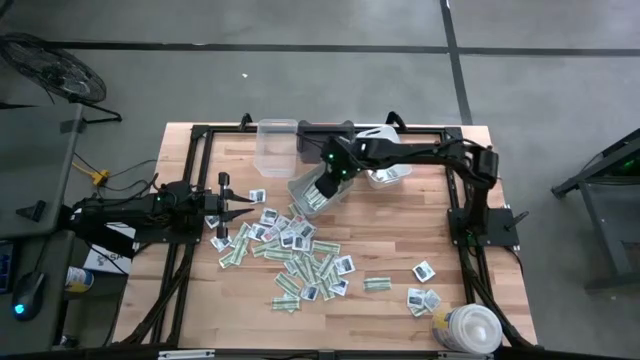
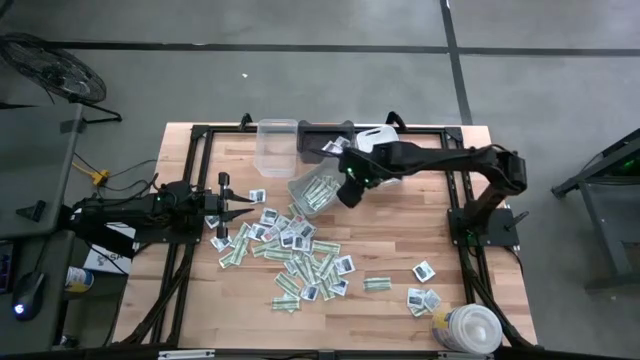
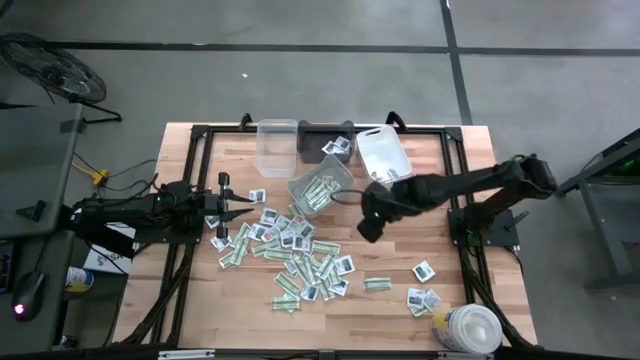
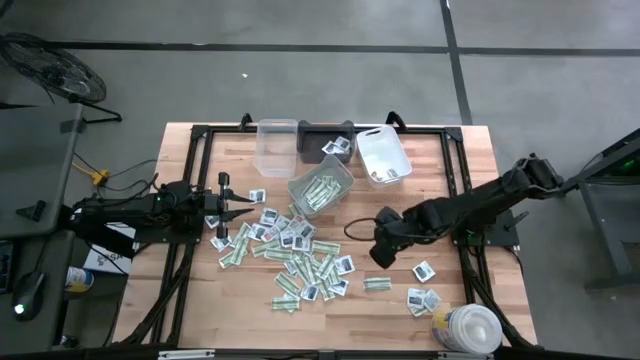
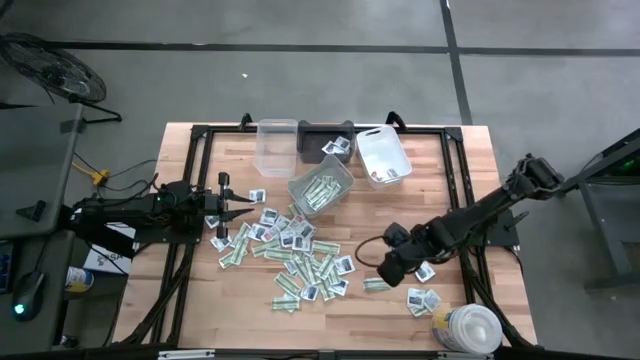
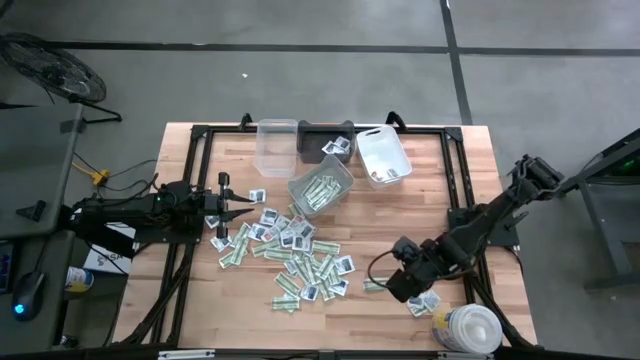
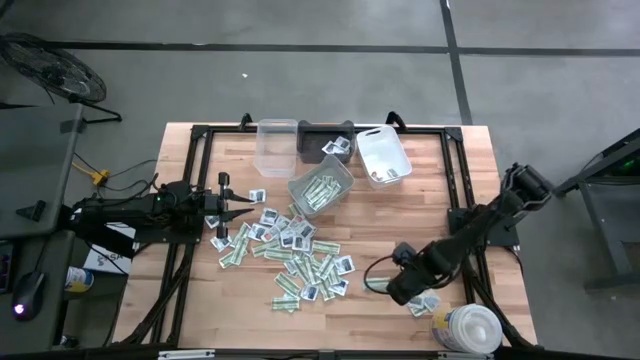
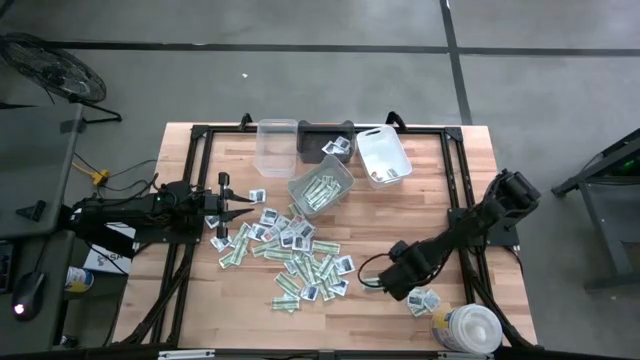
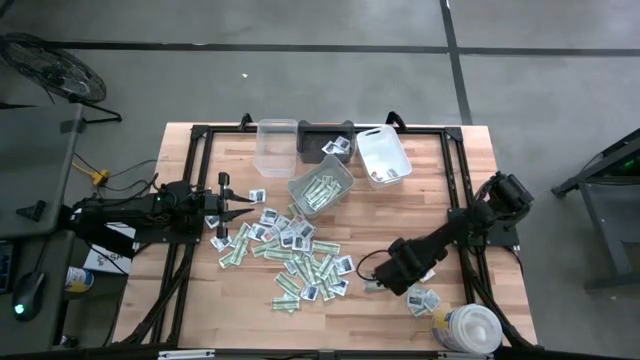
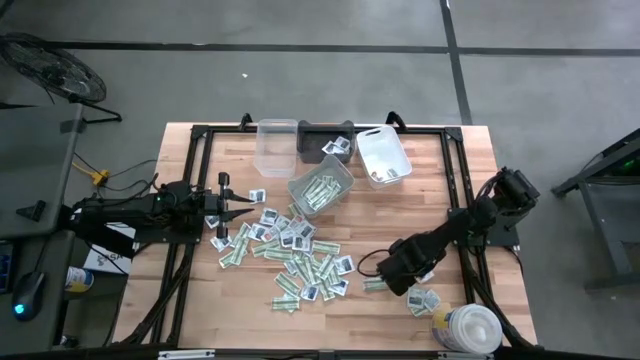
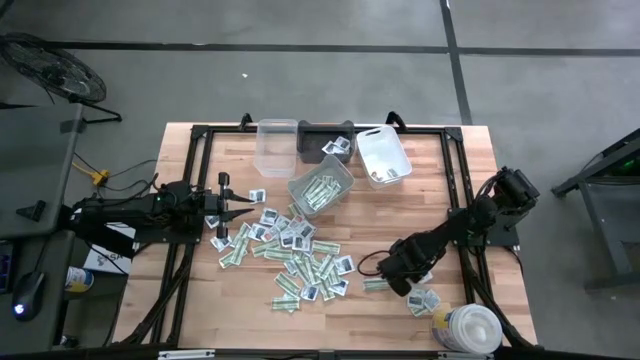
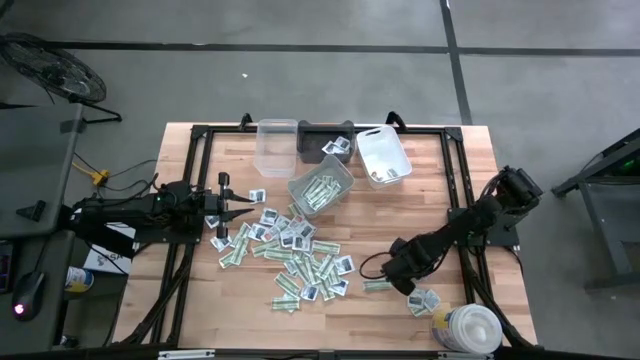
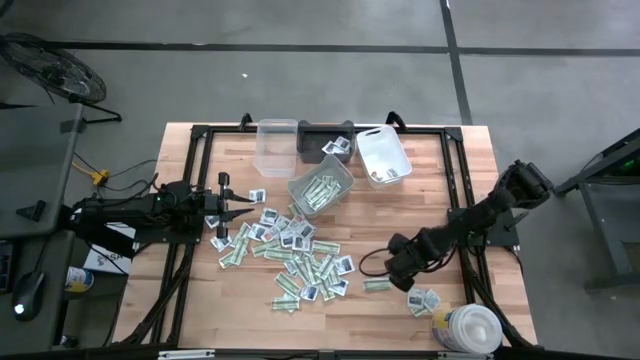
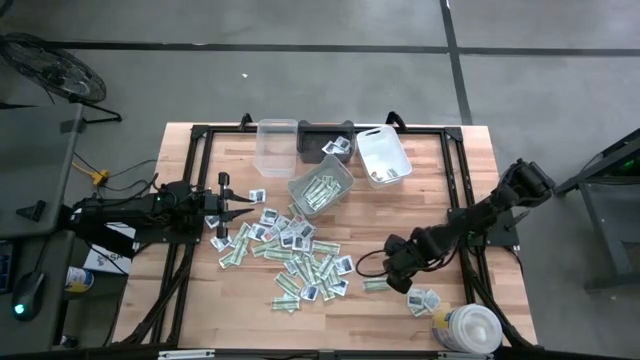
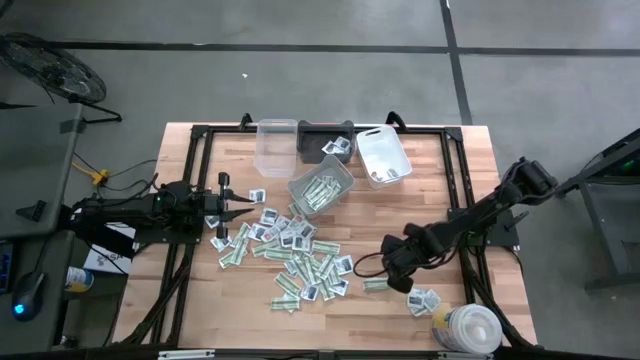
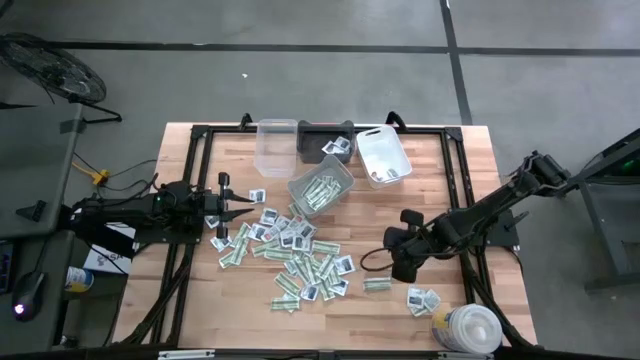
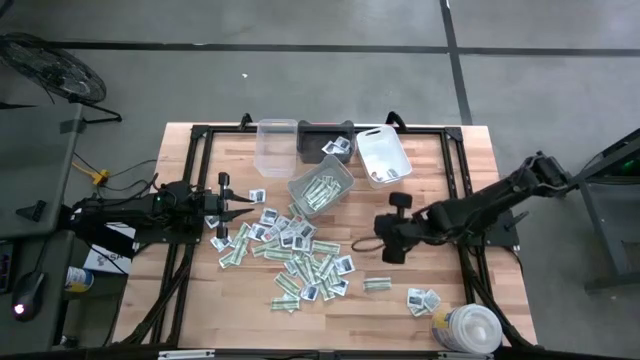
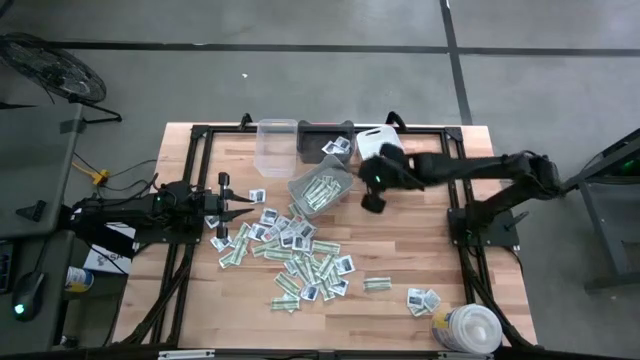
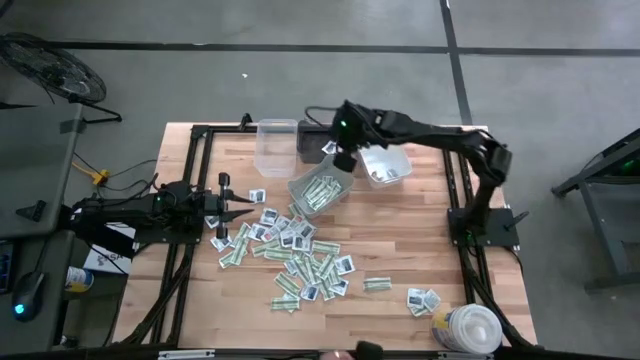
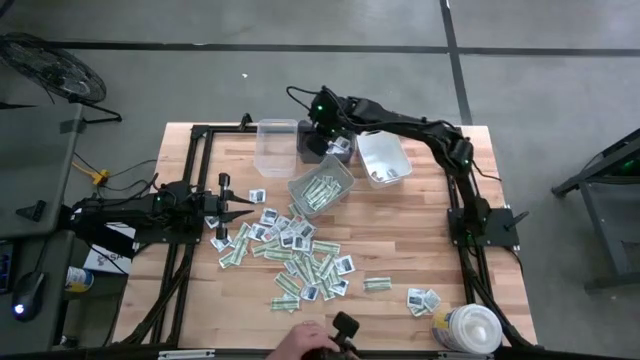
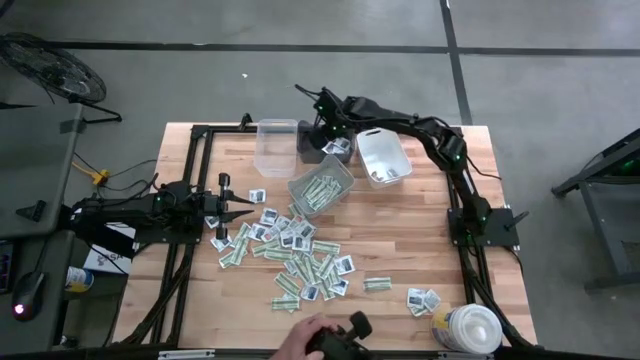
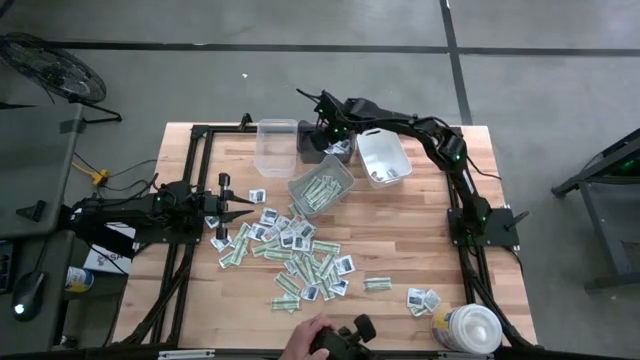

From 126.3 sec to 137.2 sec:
Task: Pick & Place First Aid Supplies
Put the towelette pack into the black bin

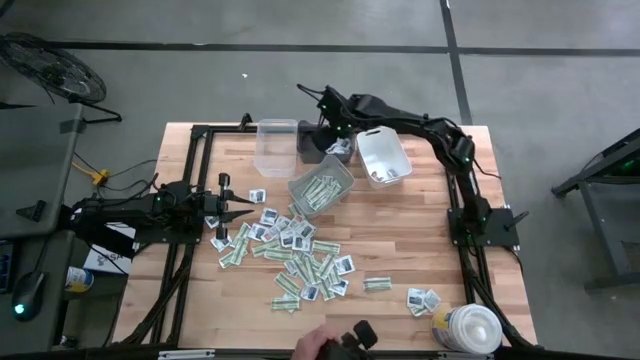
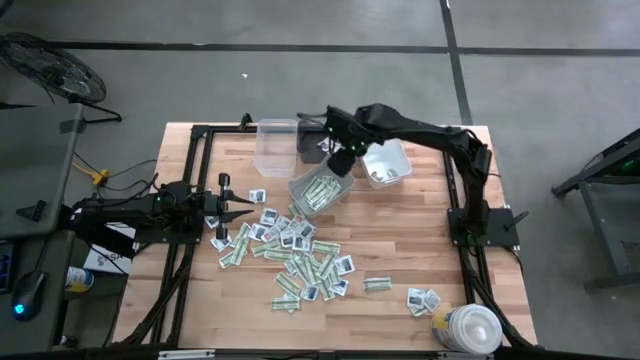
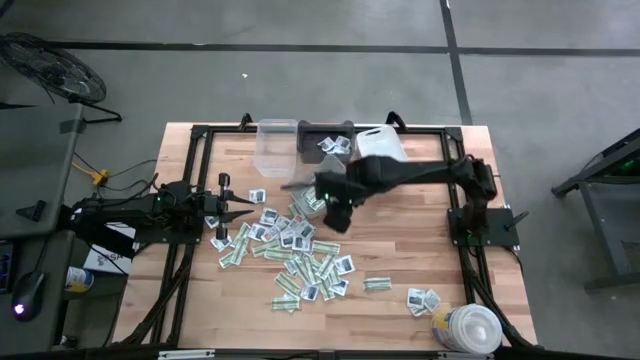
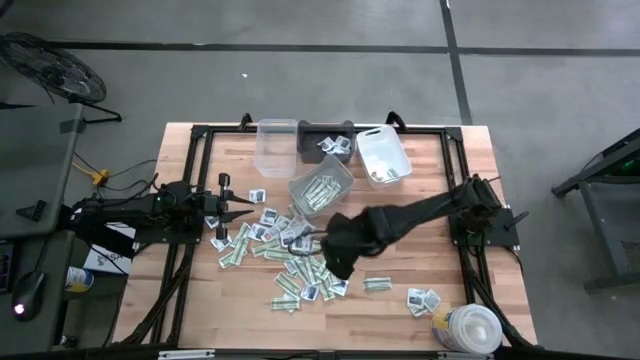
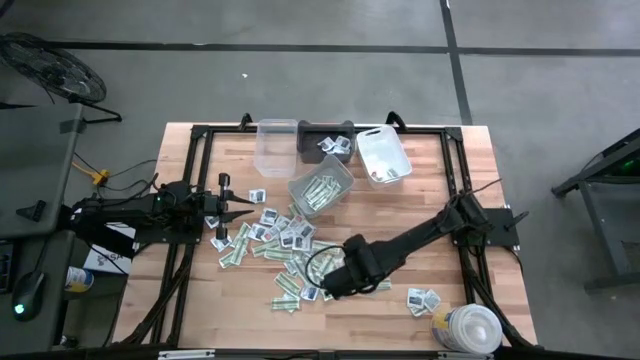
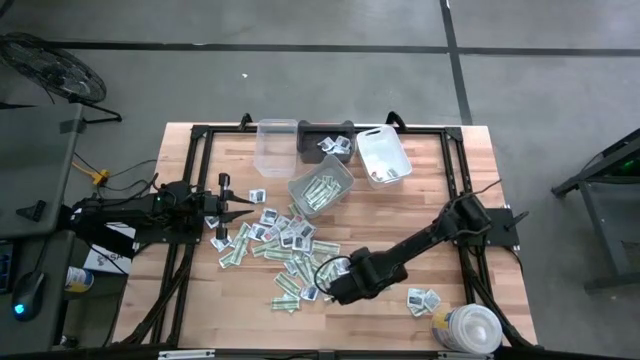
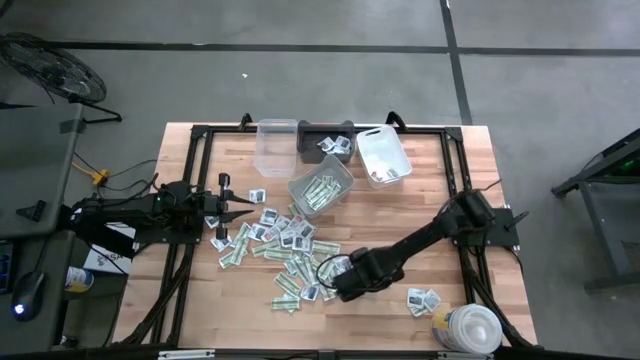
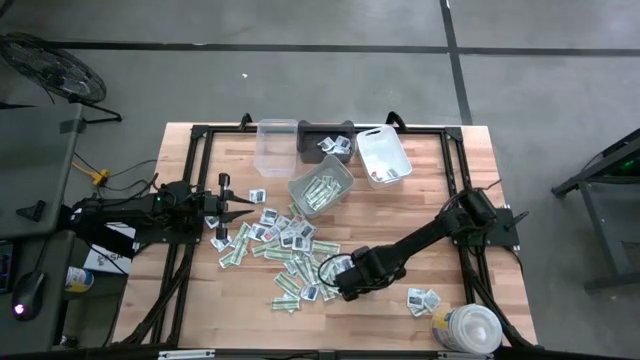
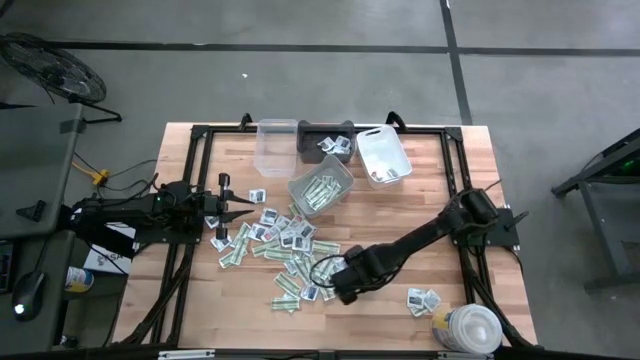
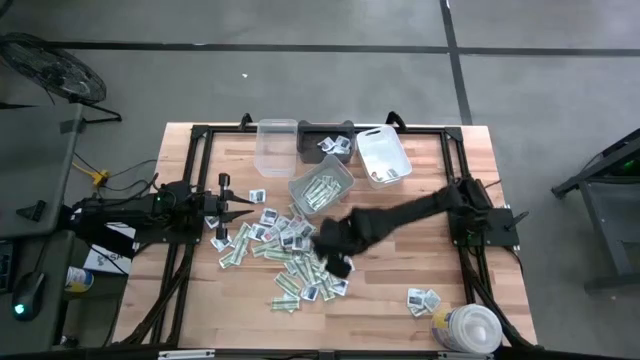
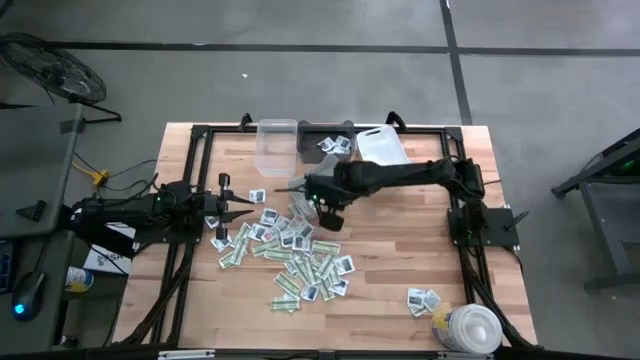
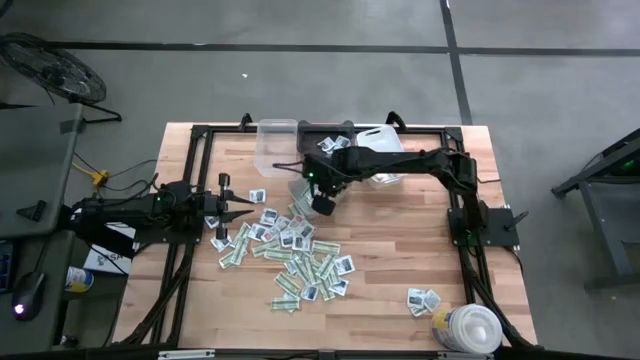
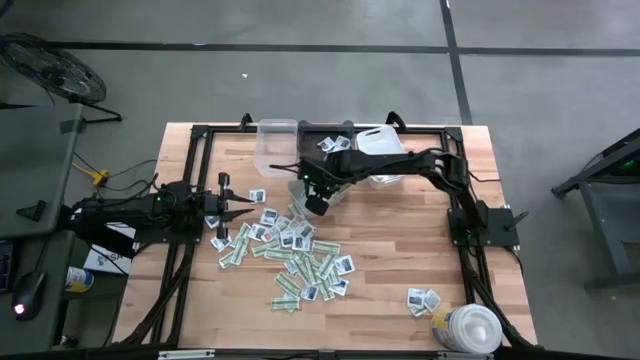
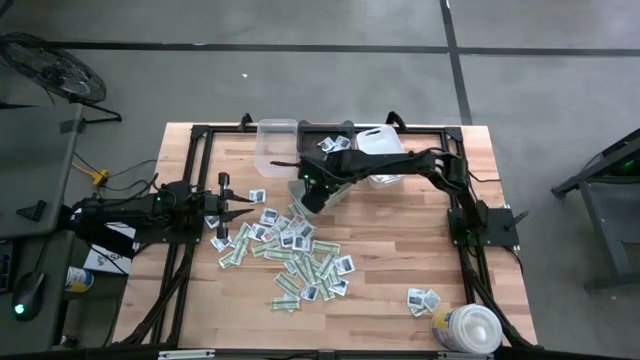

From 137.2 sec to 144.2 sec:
Put the bandage pack into the gray bin

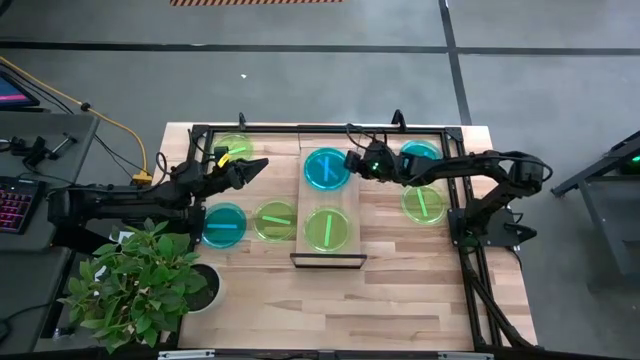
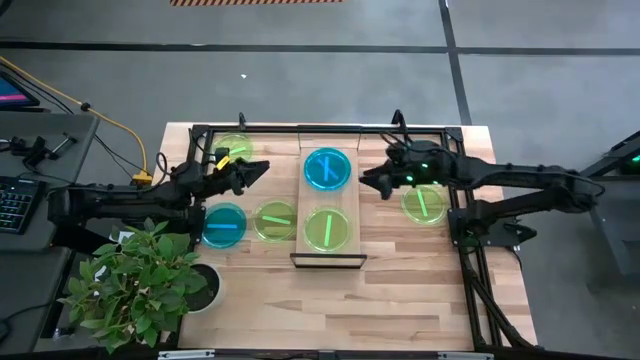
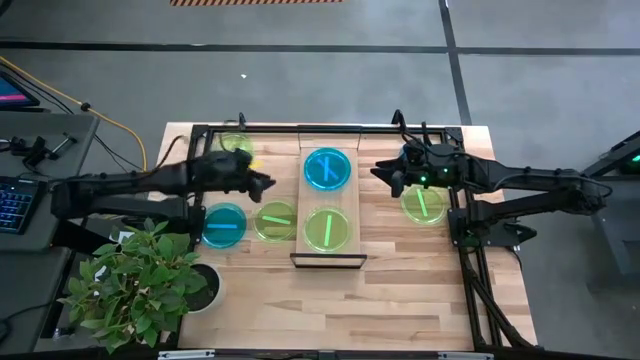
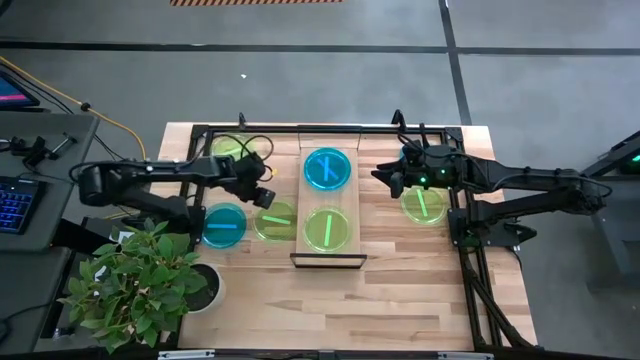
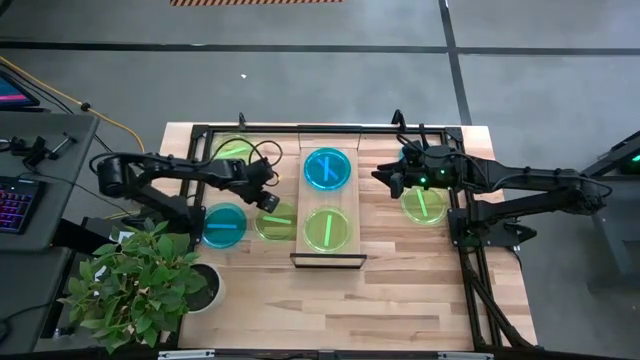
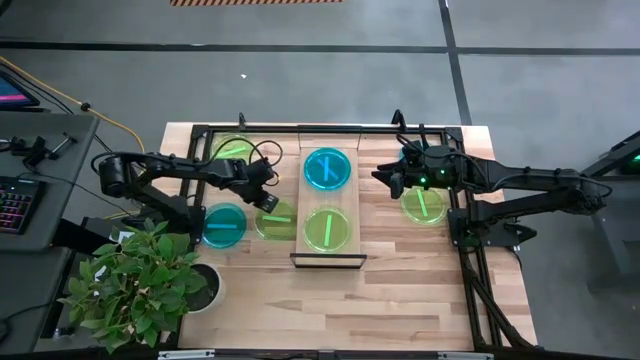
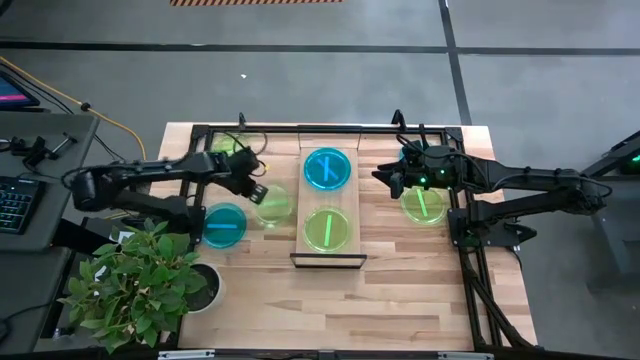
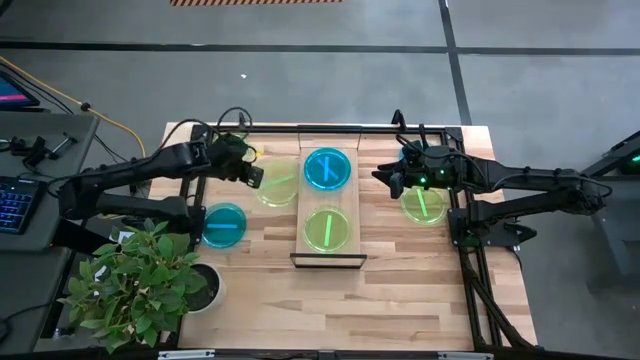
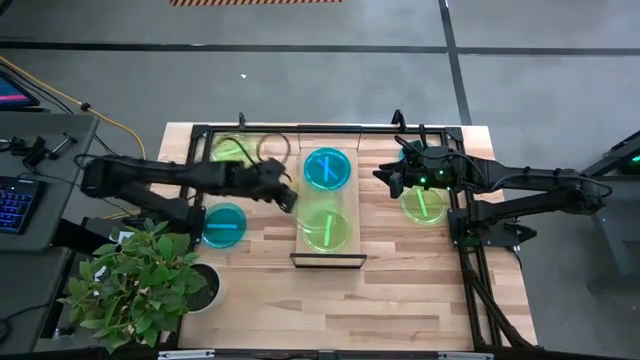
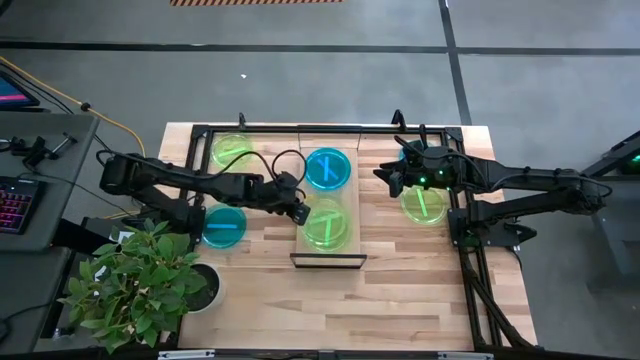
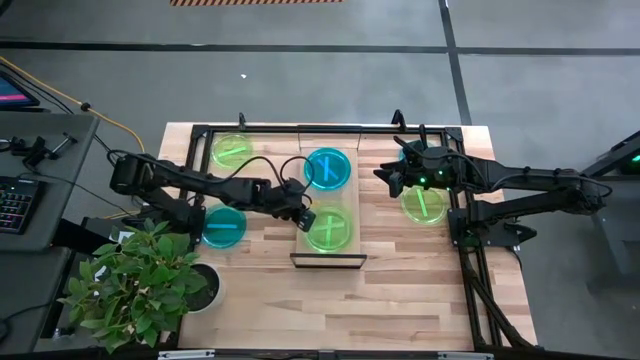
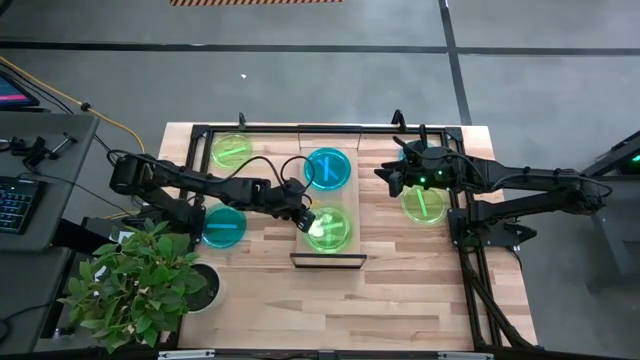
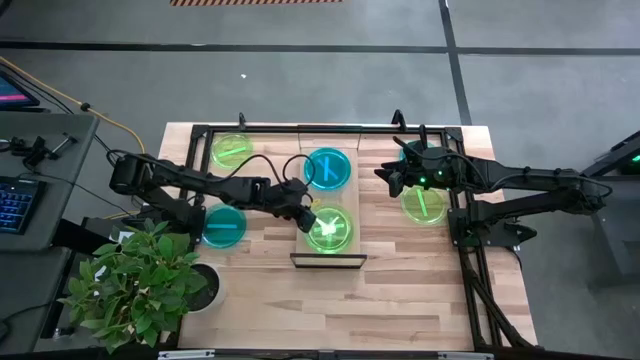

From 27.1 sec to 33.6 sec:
Task: Place and stack plates onto a shelf
Stack the green plate on top of the green plate on the shelf
